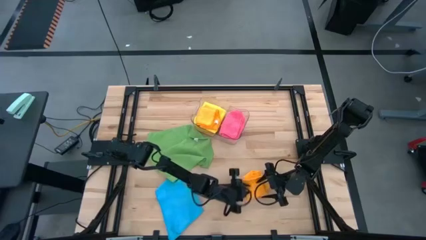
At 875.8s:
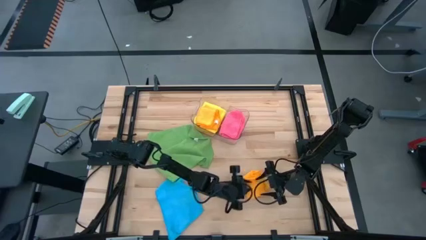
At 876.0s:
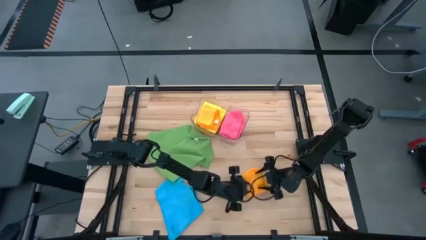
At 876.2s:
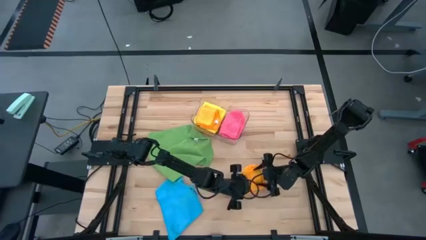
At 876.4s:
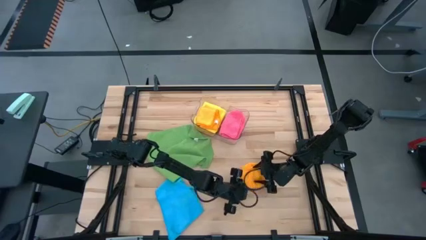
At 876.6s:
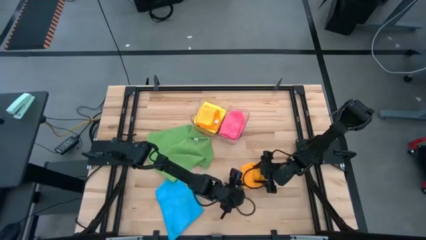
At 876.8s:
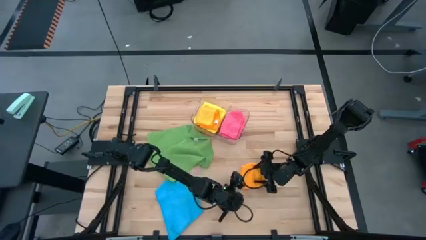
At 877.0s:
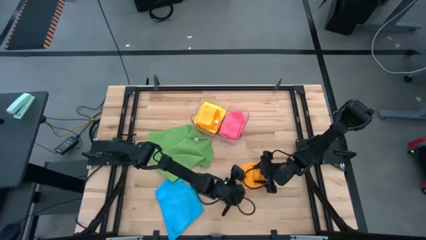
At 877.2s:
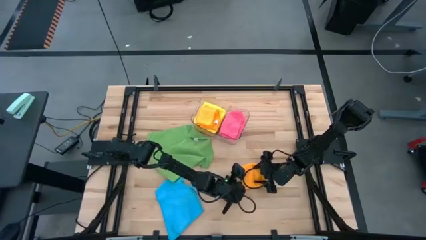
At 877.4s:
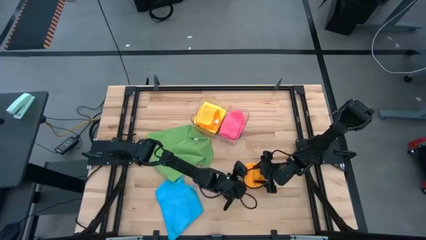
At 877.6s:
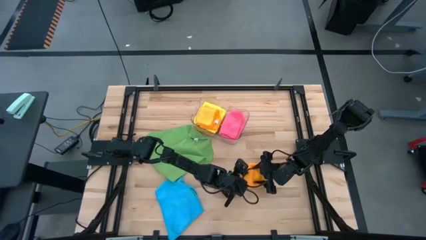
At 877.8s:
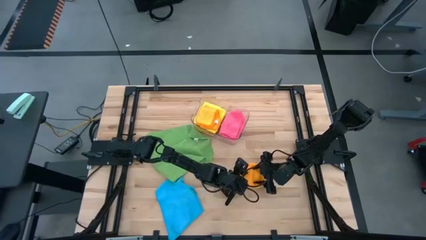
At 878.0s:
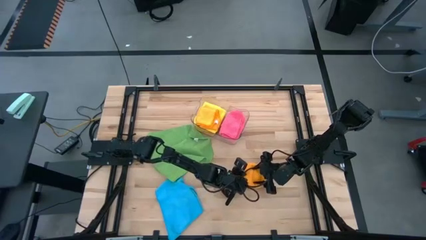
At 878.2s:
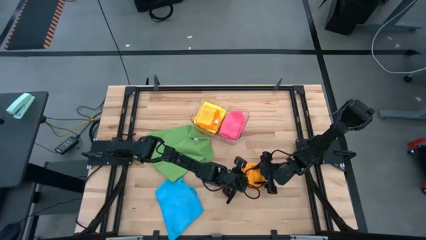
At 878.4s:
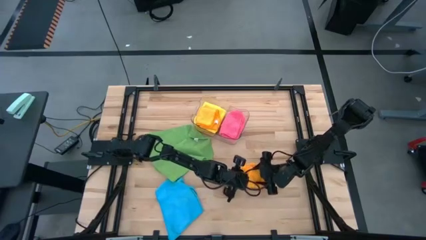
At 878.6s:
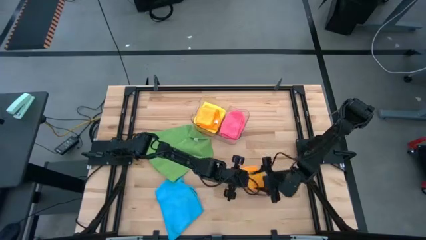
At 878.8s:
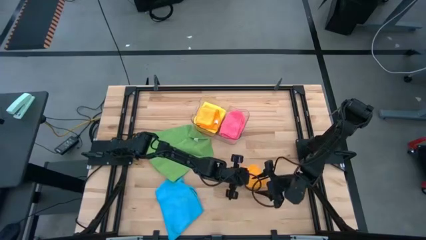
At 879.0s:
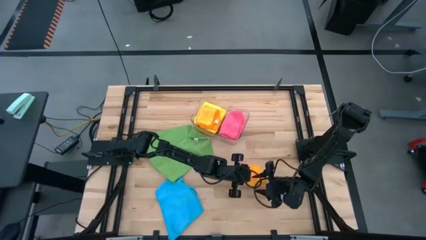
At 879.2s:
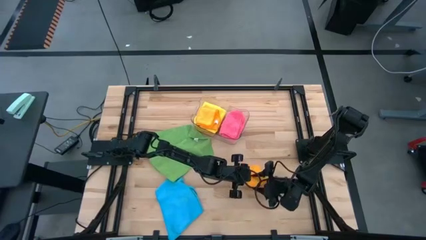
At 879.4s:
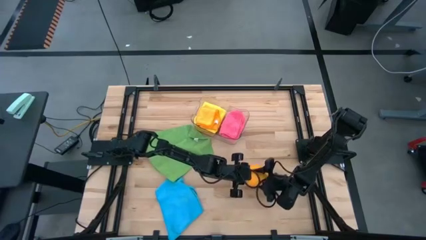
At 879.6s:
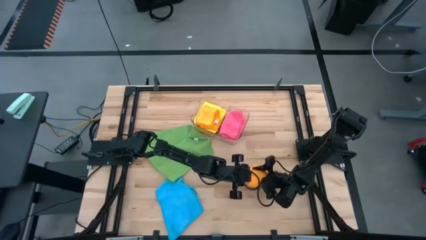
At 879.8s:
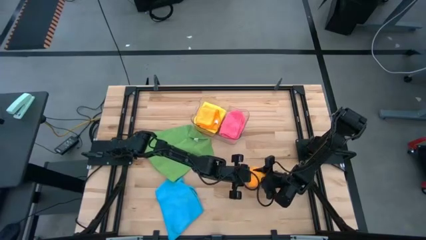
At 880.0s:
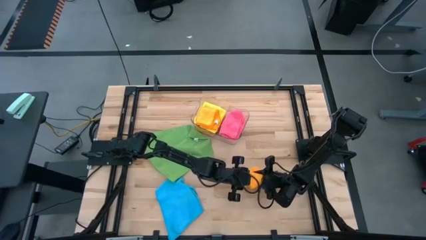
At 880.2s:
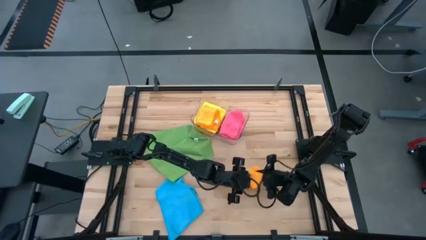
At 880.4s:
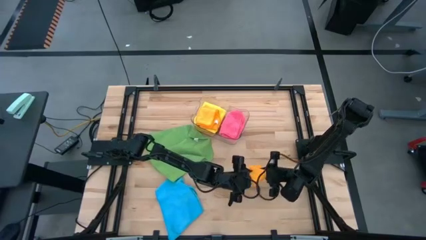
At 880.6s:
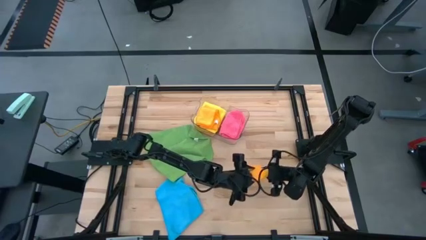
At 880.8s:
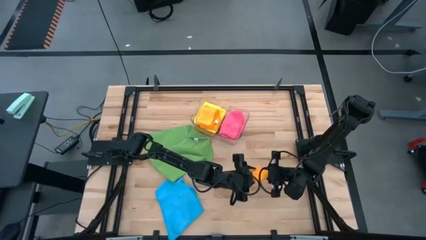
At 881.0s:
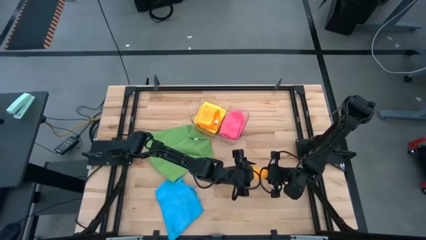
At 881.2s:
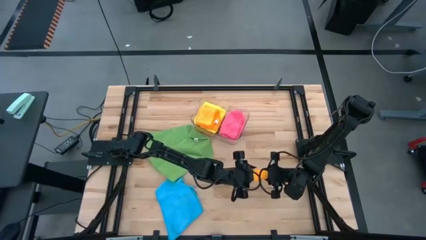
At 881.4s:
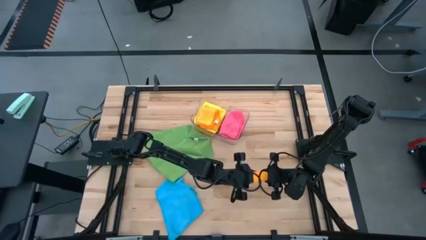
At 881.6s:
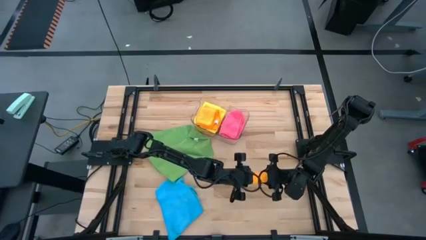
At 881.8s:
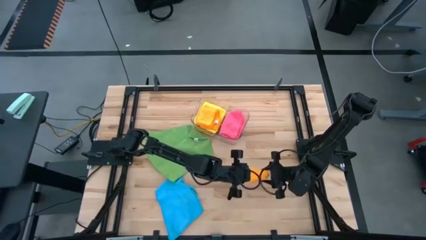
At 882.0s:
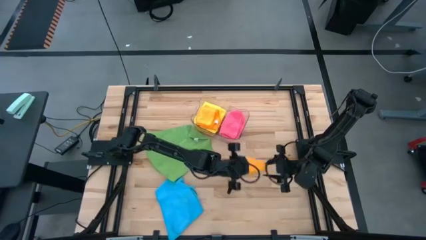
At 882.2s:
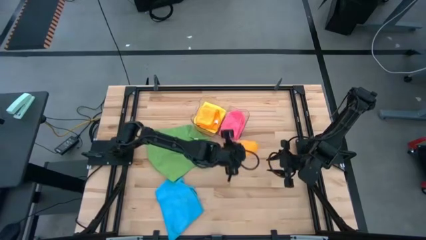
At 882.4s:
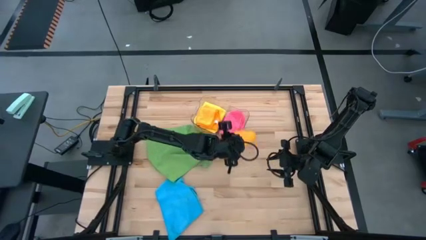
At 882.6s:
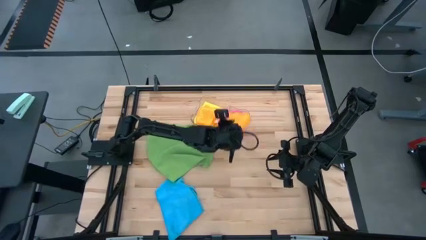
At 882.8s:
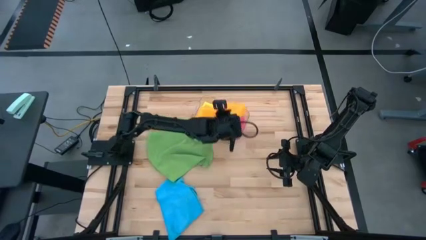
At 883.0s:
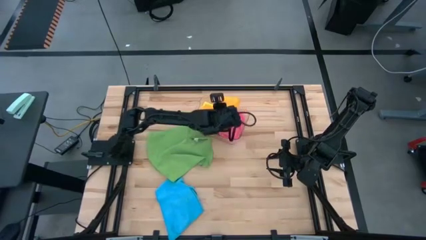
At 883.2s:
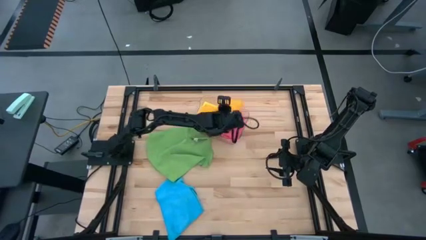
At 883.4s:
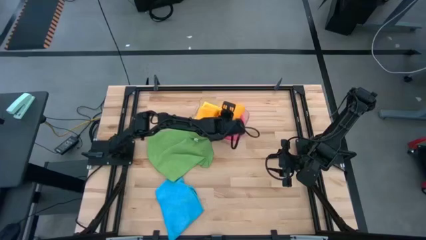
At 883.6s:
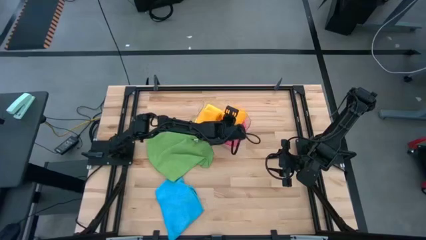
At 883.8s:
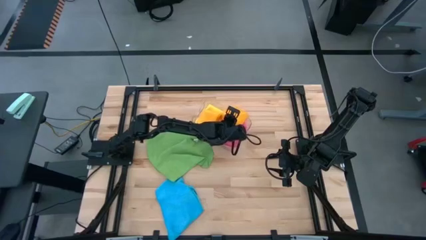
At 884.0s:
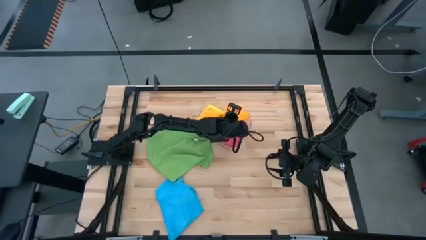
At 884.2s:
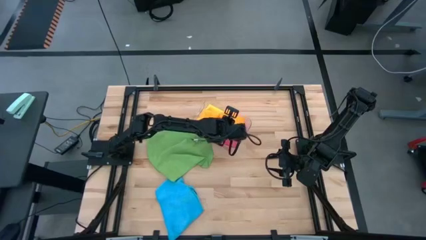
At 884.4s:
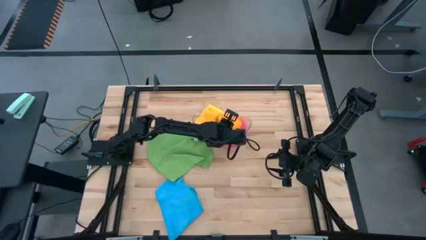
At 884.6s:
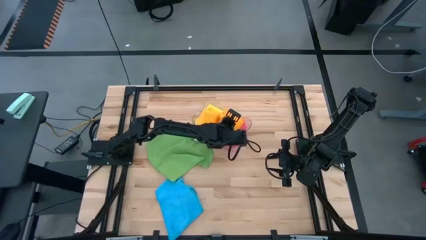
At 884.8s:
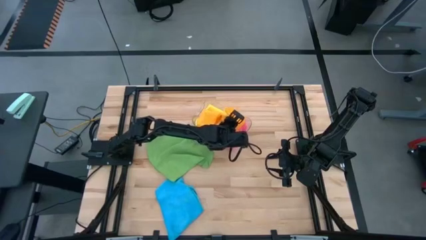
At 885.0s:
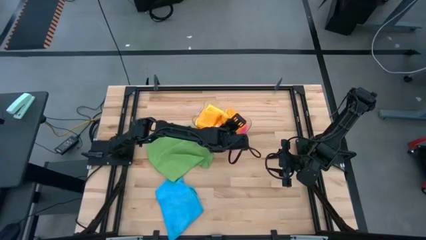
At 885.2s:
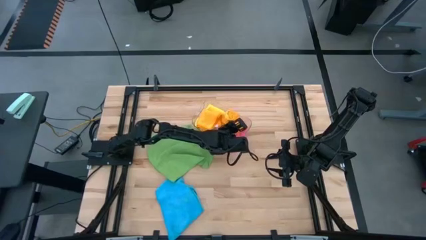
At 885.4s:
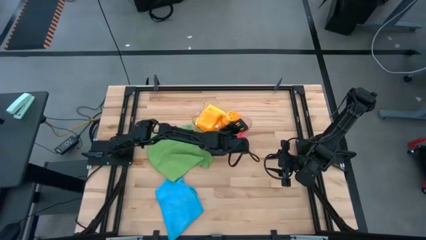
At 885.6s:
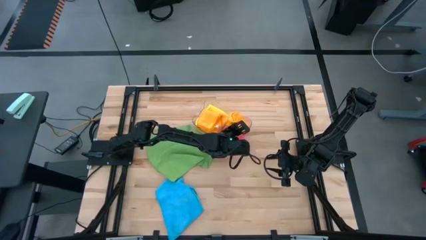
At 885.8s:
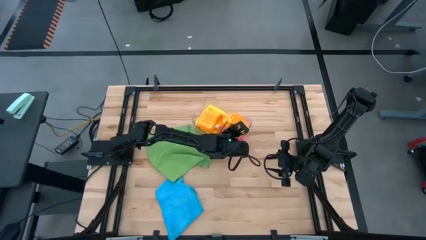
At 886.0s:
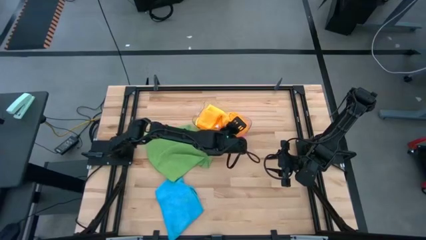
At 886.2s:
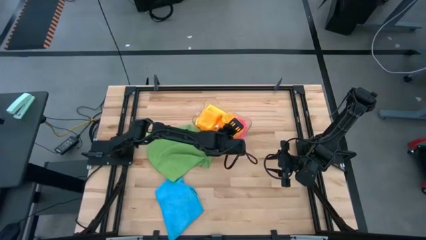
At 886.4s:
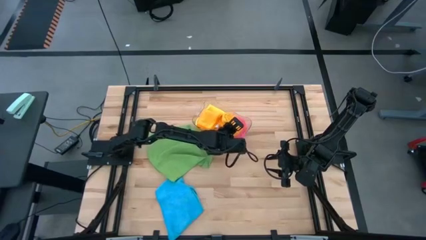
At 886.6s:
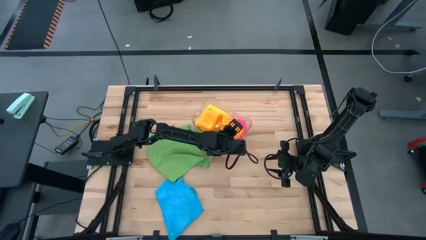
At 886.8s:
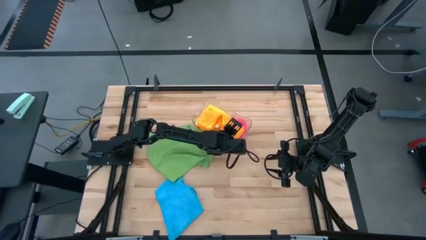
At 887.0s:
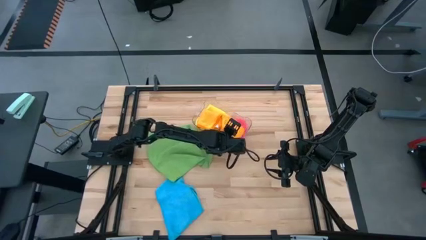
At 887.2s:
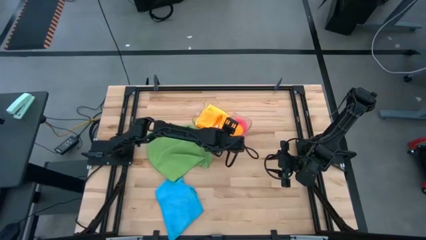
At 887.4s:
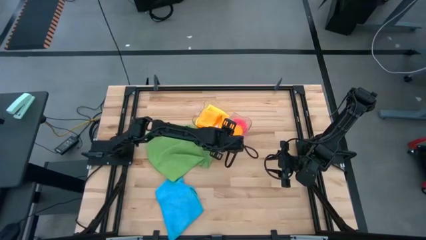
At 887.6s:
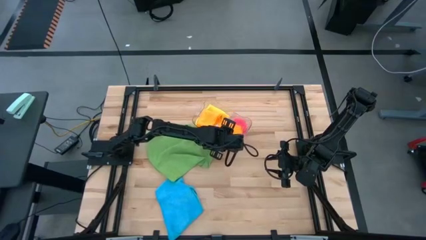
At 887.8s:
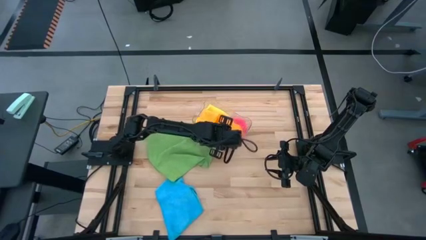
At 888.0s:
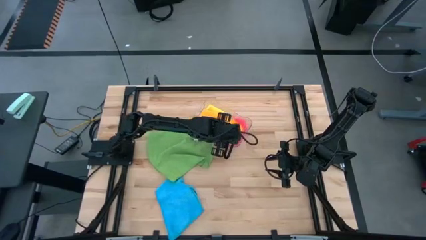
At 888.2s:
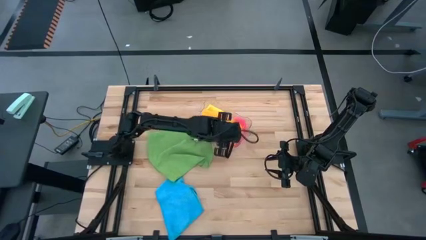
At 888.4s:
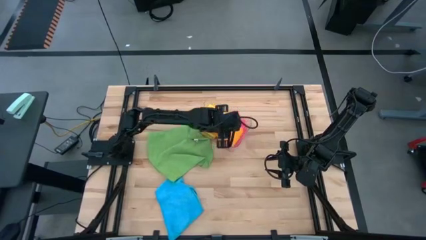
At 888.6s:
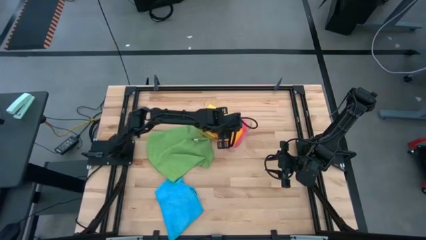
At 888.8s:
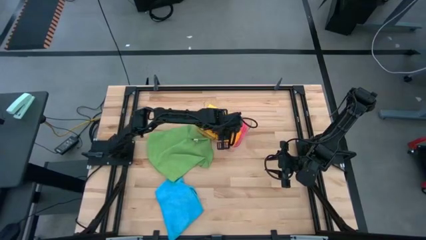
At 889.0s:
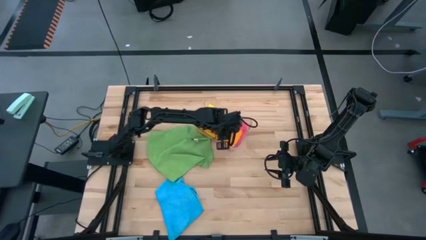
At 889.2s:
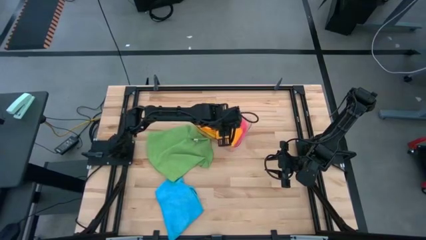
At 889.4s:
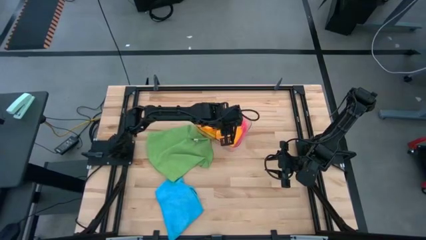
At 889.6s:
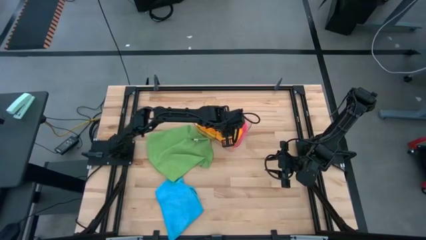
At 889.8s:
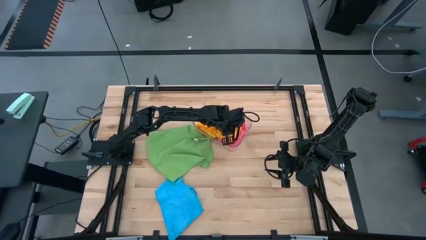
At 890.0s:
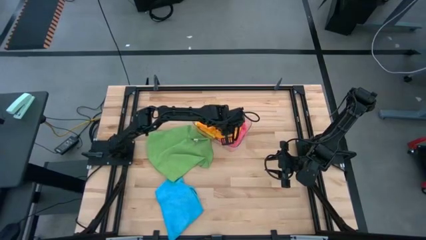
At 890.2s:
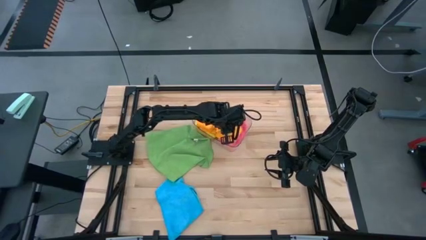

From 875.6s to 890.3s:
Task: Fold microfiber towels
Put the orange microfiber cloth into the transparent bin

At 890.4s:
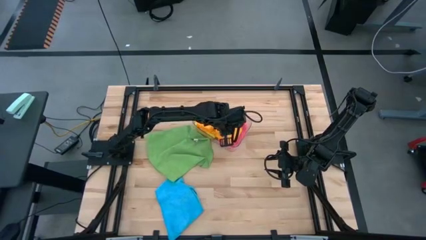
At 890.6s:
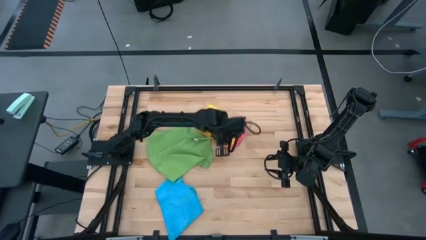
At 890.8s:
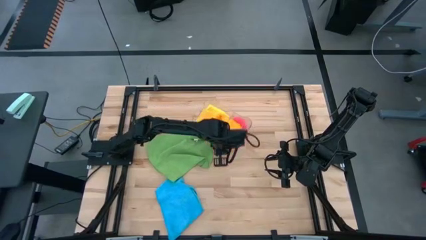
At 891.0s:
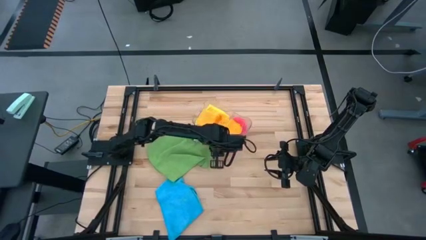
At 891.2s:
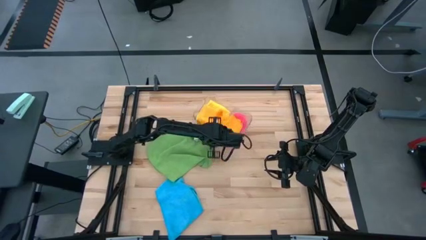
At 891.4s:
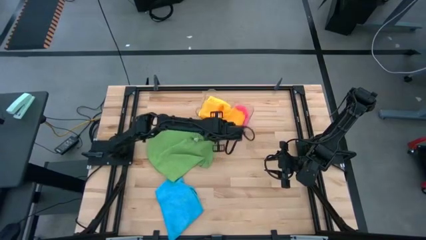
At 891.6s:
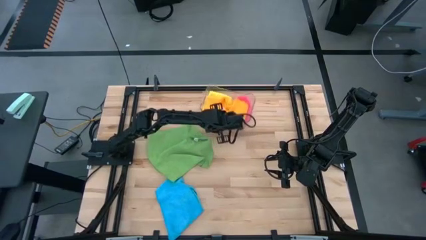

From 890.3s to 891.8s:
Move the transparent bin to top
